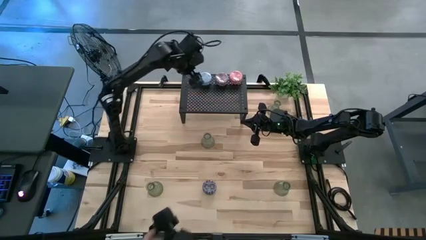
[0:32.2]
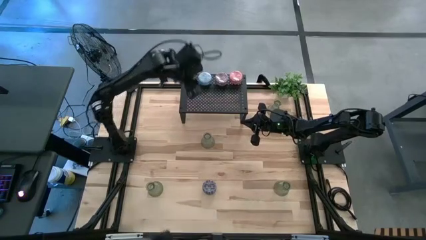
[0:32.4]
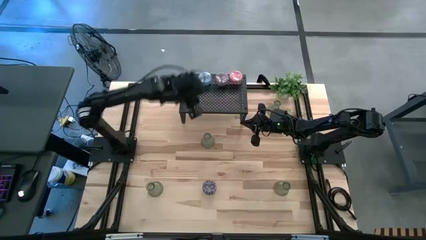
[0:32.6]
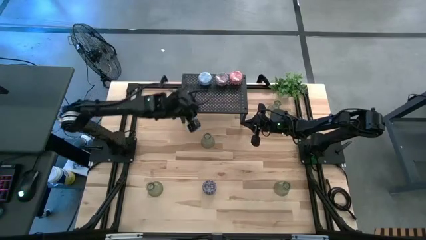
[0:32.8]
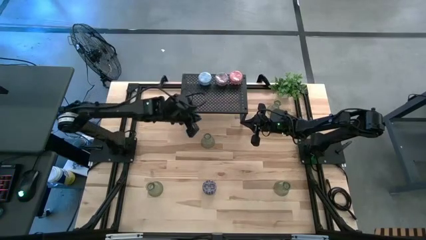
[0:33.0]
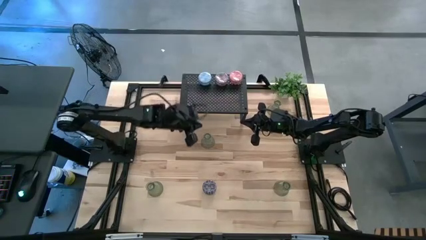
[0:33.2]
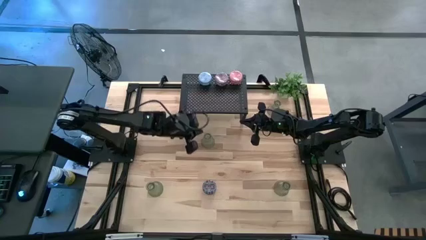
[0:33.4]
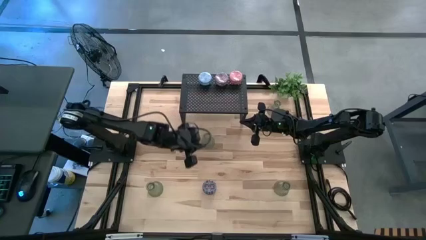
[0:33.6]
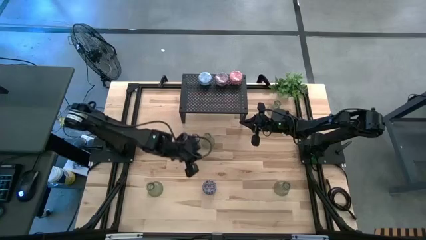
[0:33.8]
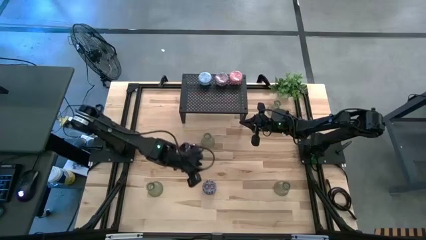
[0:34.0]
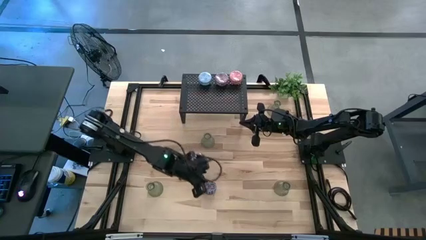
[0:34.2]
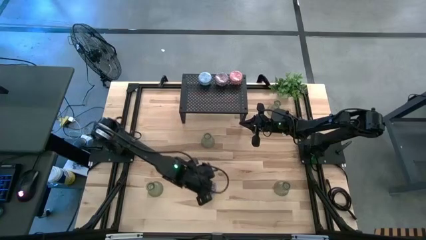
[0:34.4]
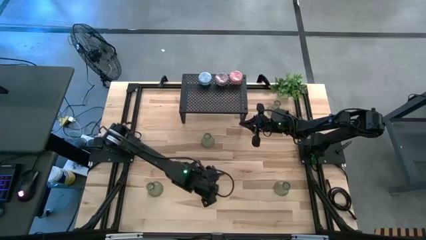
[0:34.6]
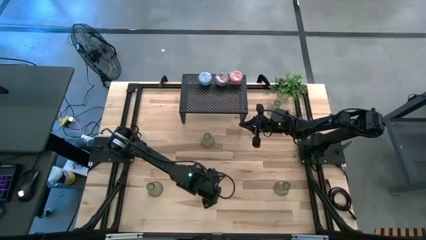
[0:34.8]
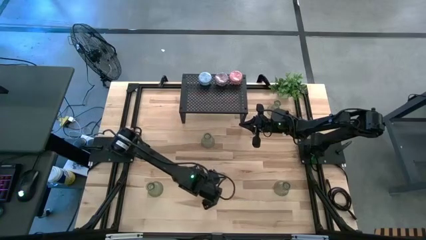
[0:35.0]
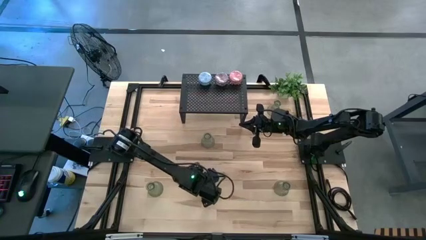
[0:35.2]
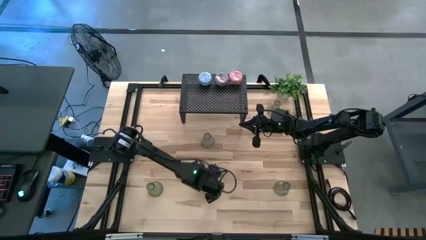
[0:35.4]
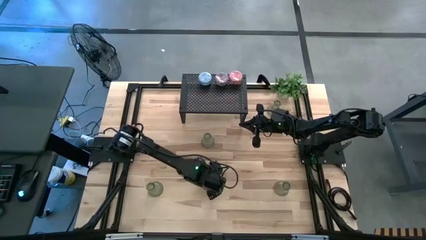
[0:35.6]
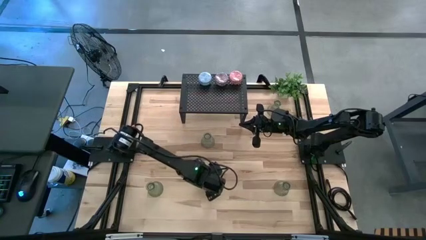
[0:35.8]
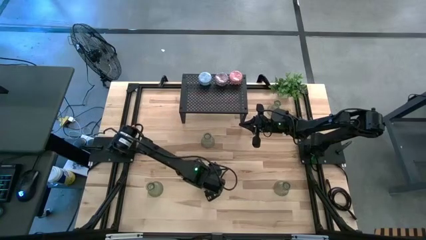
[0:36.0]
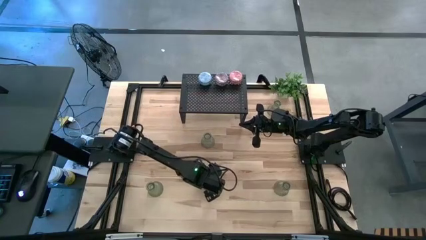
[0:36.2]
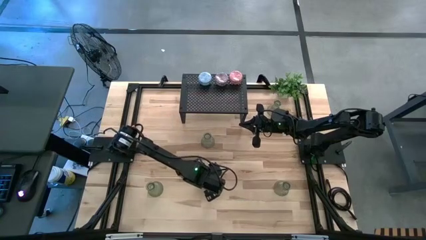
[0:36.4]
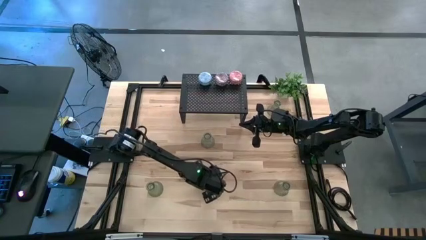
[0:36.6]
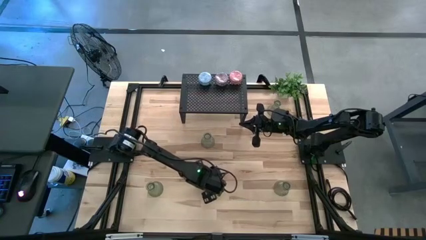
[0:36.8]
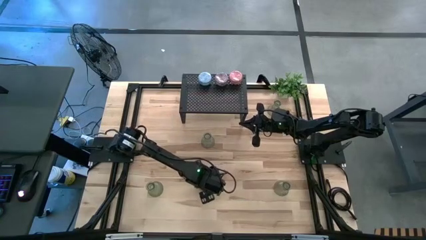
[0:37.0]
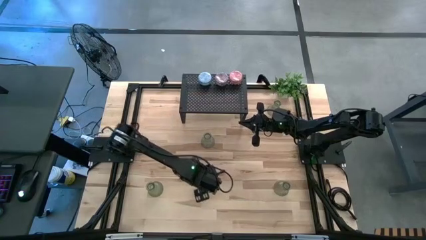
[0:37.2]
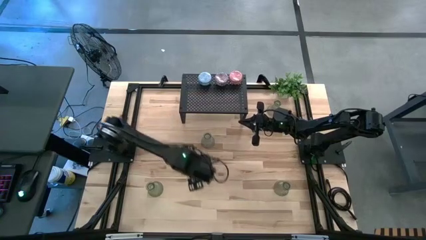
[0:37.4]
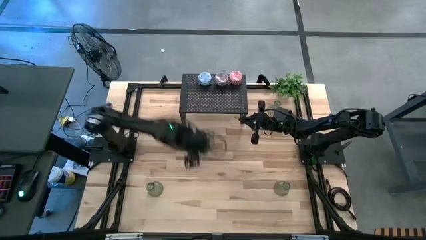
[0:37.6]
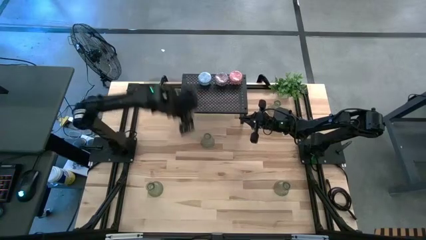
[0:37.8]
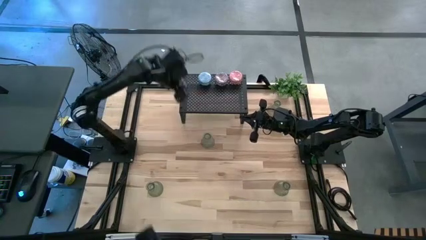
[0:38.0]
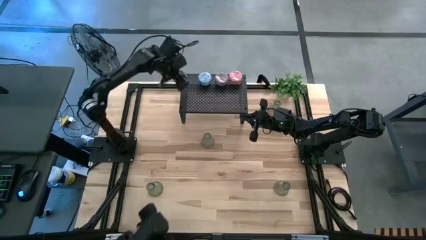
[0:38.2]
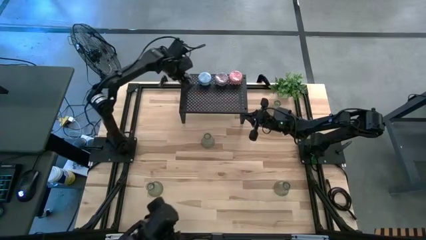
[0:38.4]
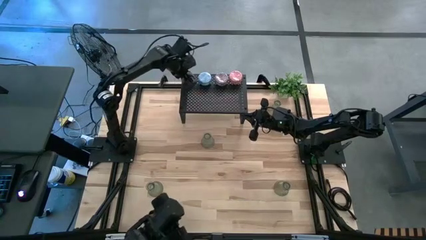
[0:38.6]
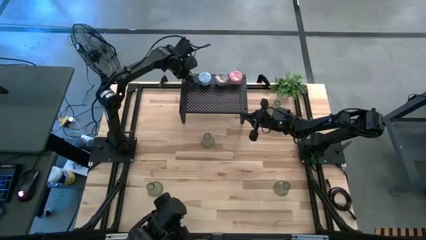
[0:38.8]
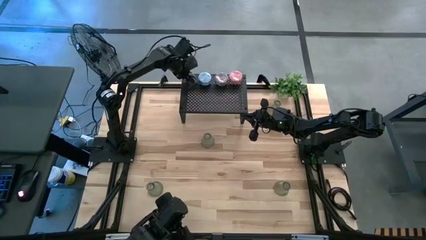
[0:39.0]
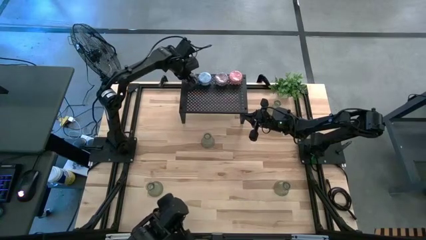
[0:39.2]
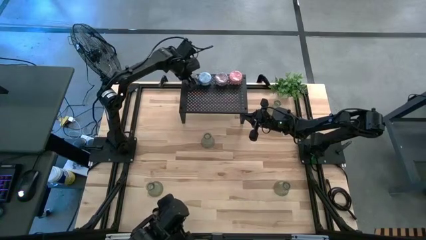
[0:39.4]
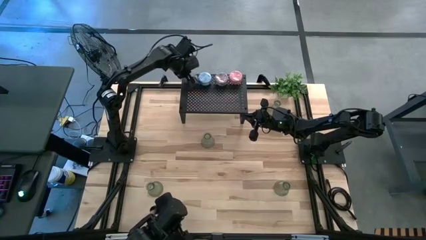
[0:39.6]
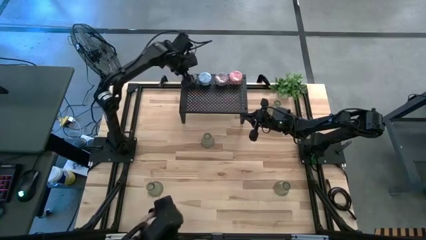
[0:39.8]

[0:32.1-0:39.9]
Task: Pick & Place candle stick holders
Align the dark red scented candle with the other scented candle on the shelf

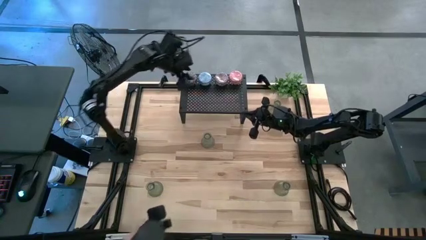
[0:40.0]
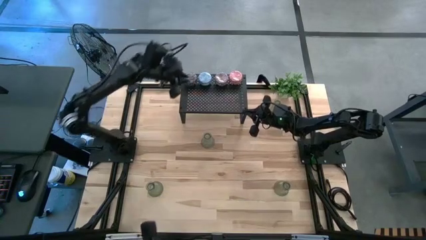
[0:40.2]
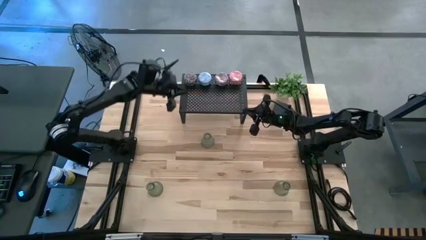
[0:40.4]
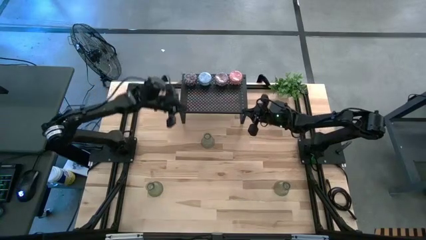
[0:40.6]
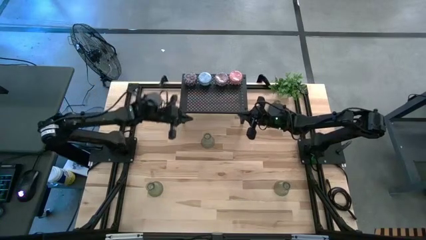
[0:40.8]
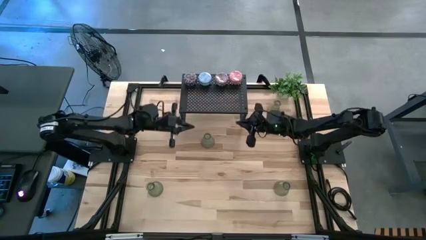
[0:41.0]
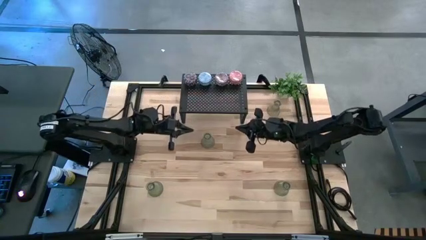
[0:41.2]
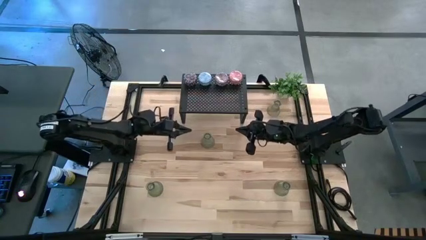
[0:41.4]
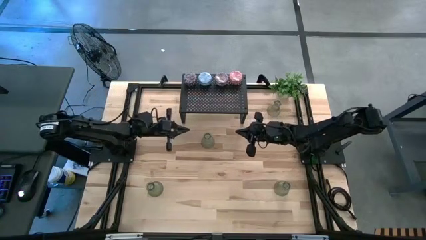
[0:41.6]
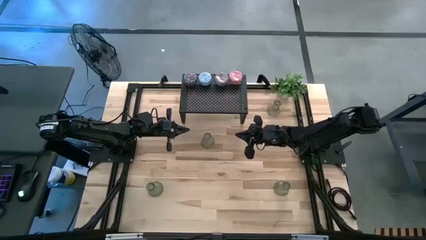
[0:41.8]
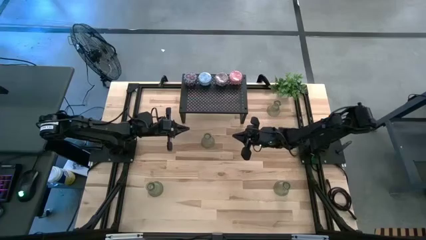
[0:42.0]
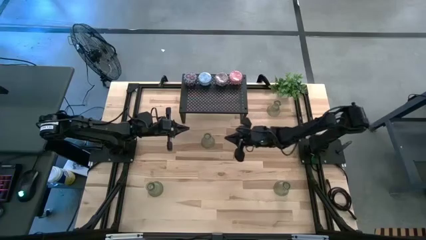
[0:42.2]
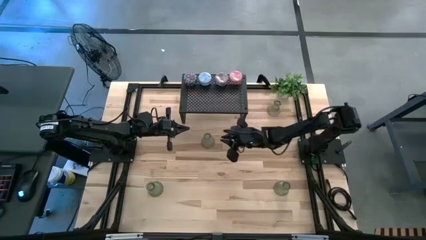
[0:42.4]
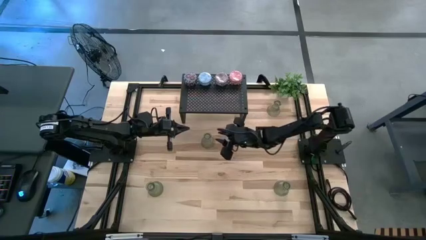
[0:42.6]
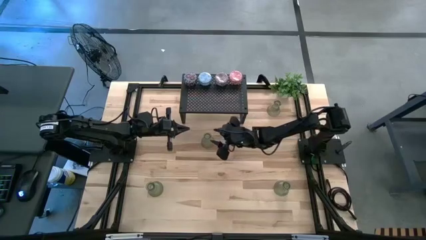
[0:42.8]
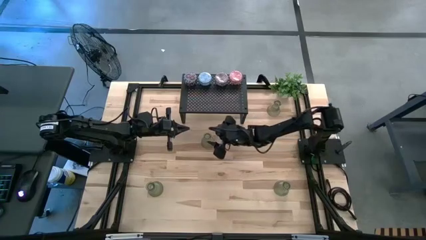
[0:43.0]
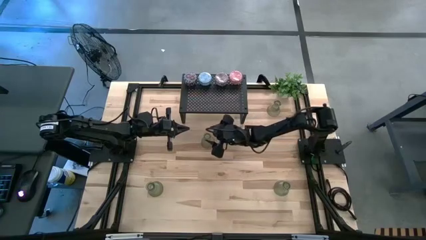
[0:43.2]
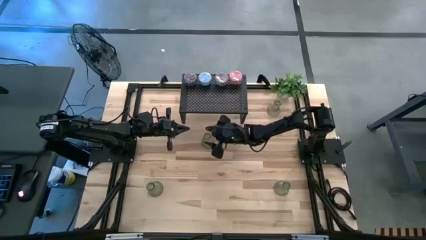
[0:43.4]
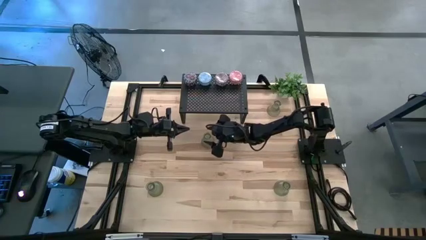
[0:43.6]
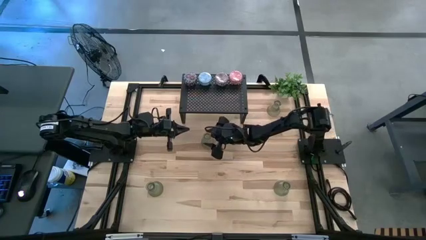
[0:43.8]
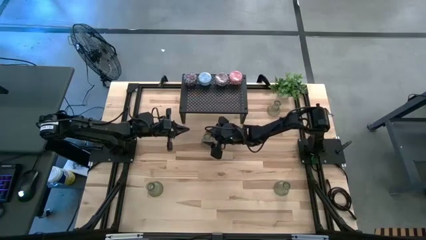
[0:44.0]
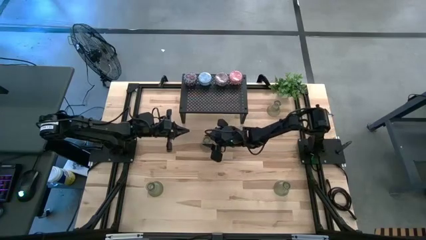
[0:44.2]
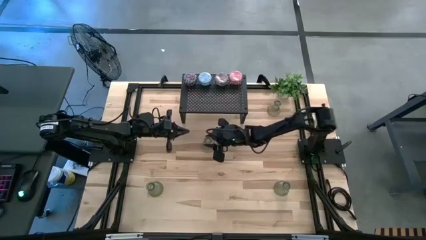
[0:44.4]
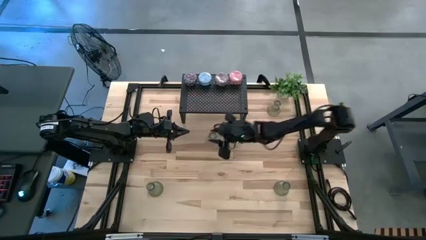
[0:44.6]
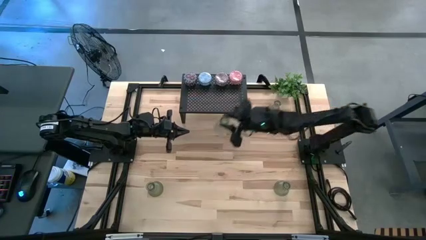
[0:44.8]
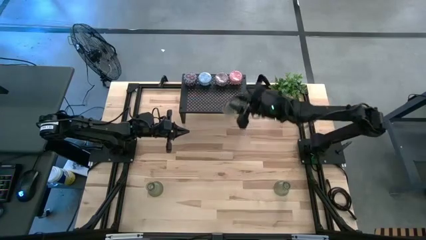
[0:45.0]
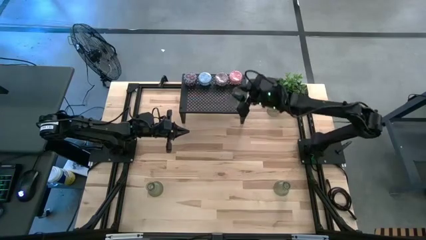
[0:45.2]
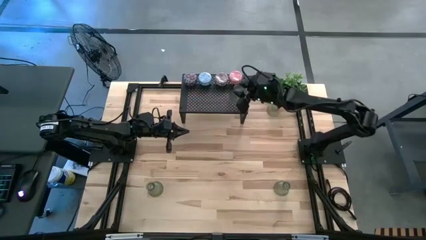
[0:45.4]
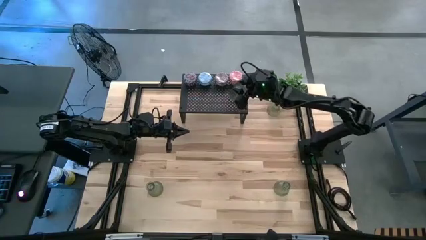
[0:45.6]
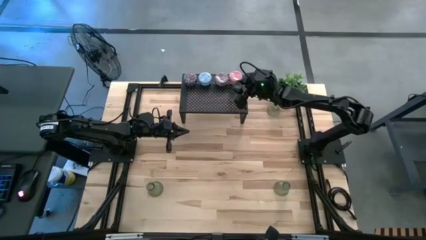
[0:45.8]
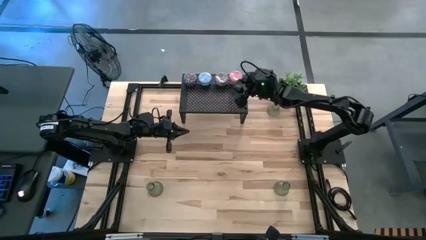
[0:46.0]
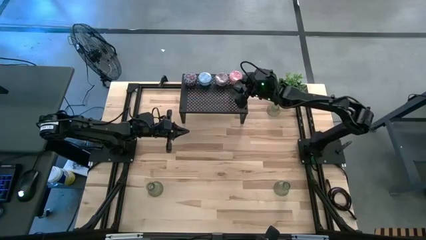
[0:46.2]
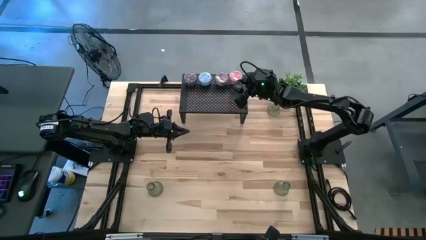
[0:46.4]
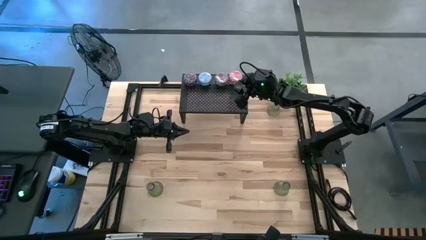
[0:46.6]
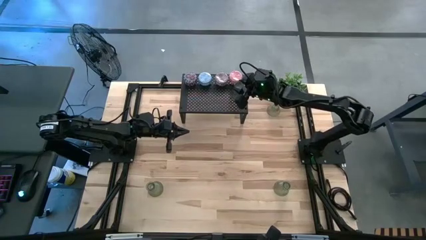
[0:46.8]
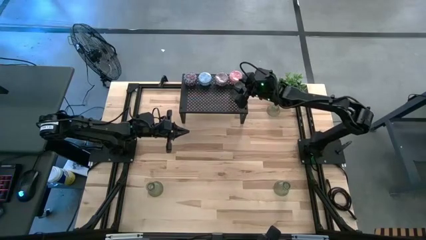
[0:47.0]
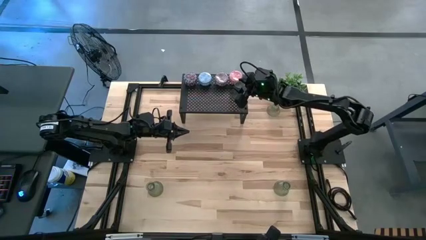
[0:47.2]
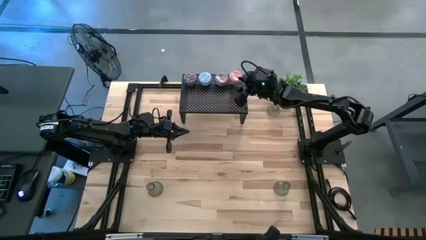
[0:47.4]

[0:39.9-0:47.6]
Put the candle holder on the shelf
